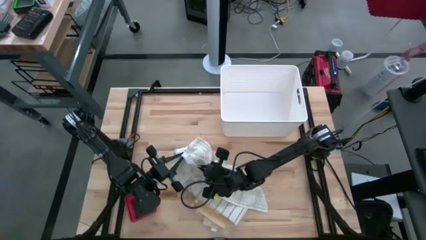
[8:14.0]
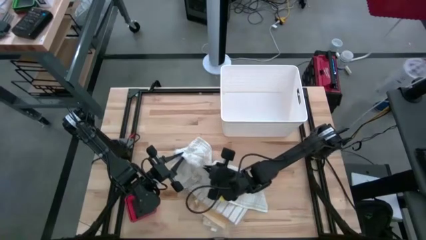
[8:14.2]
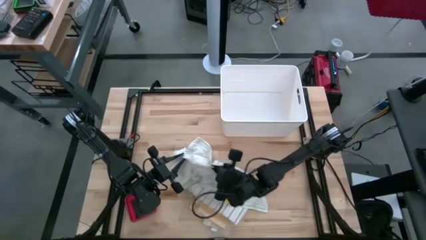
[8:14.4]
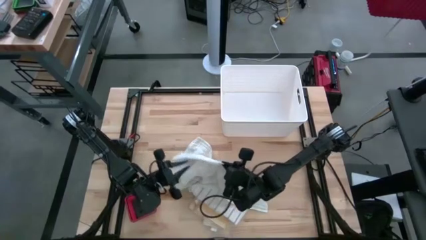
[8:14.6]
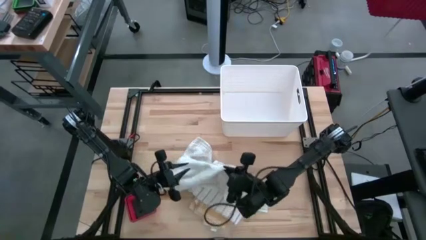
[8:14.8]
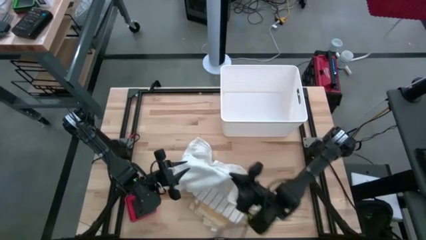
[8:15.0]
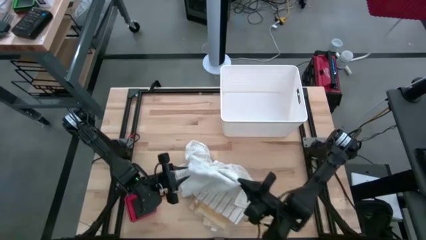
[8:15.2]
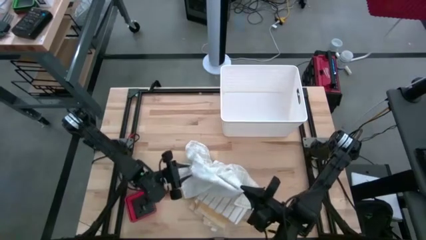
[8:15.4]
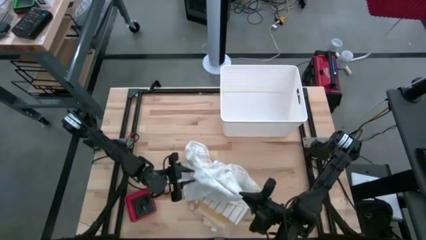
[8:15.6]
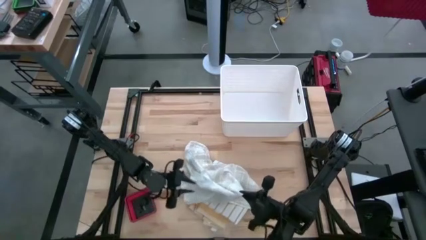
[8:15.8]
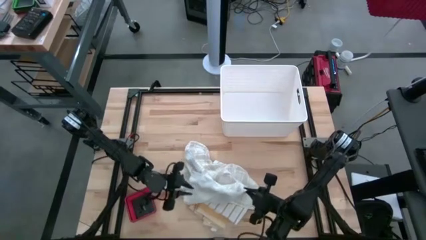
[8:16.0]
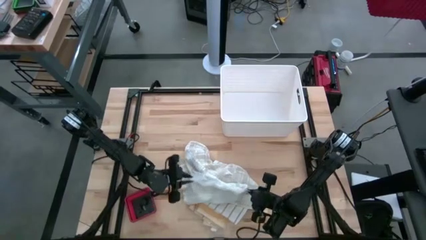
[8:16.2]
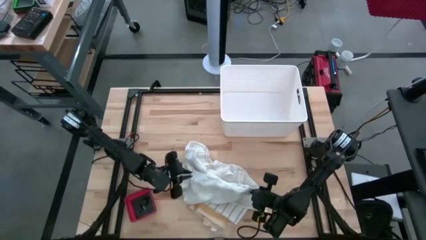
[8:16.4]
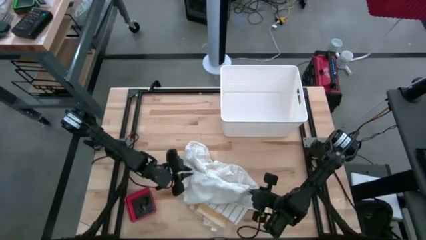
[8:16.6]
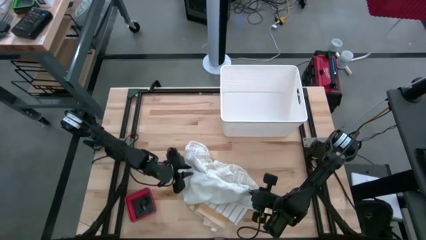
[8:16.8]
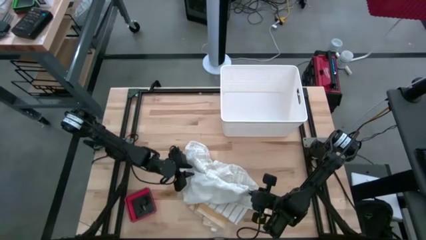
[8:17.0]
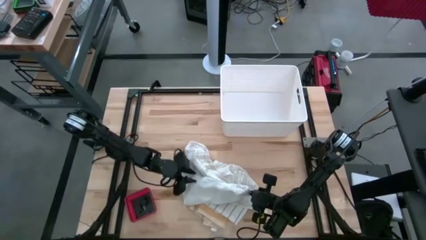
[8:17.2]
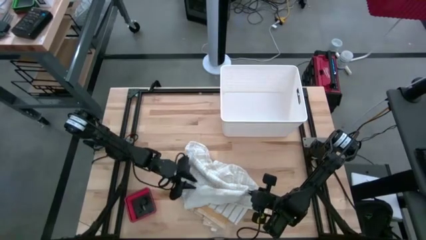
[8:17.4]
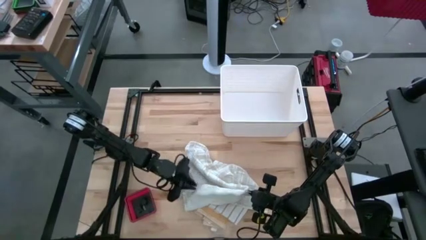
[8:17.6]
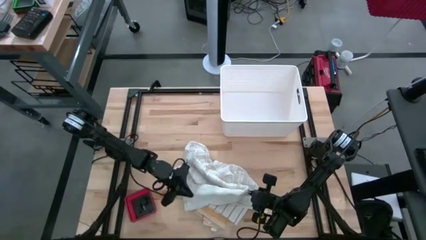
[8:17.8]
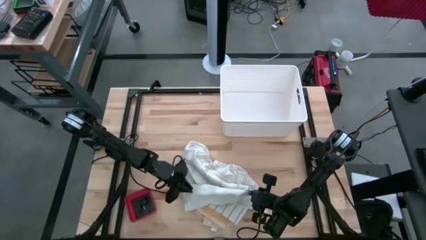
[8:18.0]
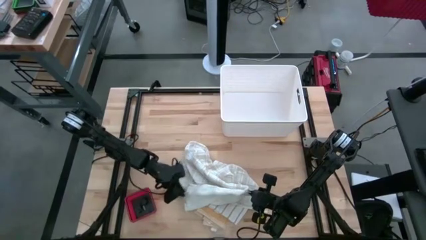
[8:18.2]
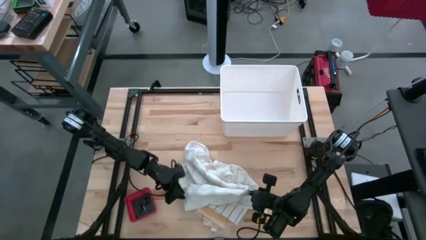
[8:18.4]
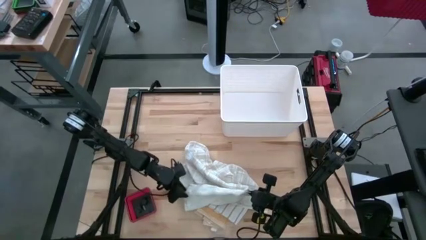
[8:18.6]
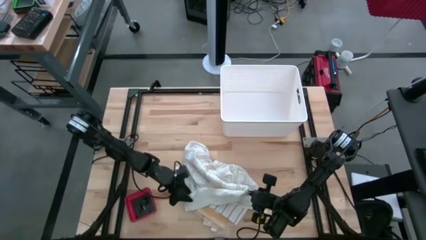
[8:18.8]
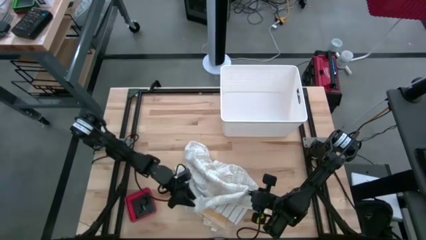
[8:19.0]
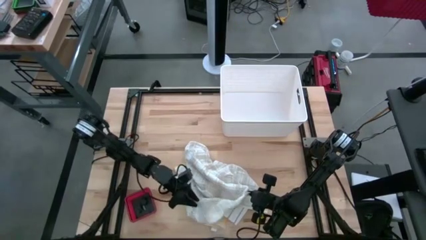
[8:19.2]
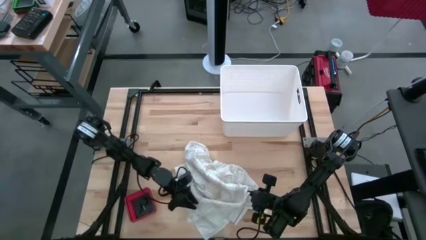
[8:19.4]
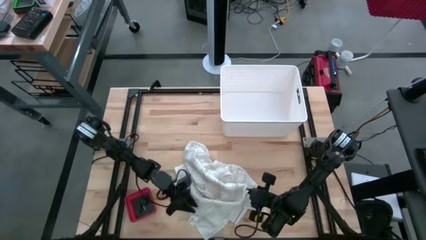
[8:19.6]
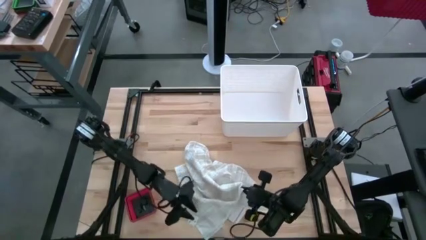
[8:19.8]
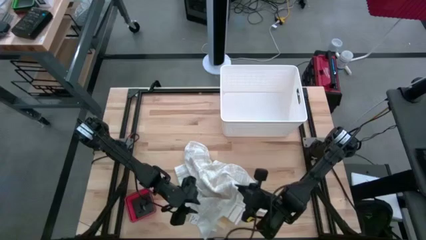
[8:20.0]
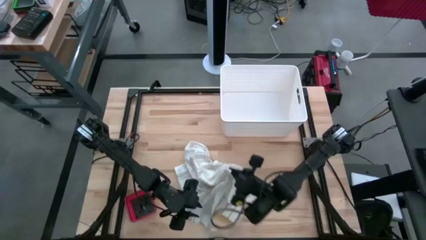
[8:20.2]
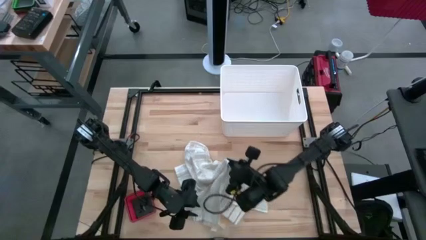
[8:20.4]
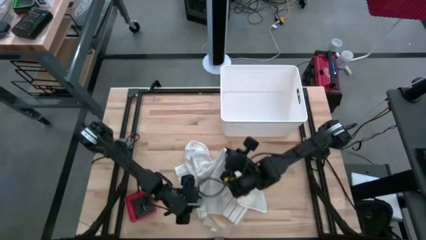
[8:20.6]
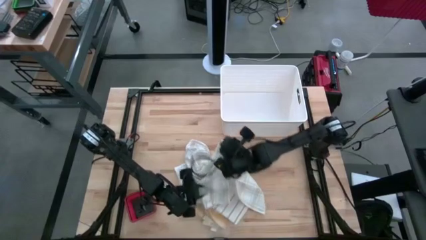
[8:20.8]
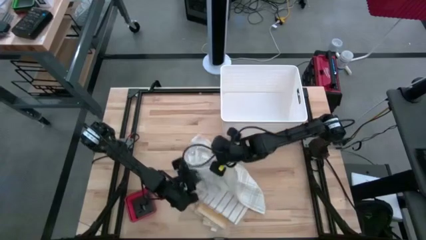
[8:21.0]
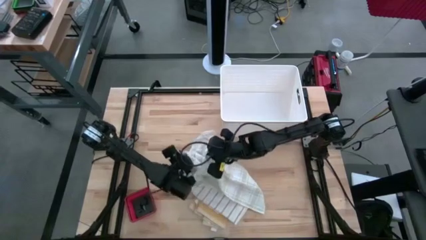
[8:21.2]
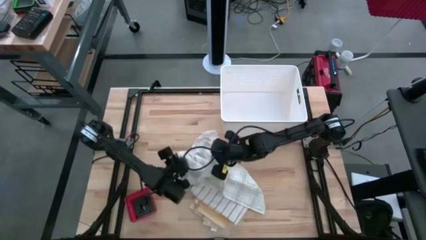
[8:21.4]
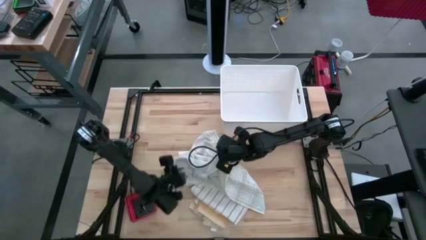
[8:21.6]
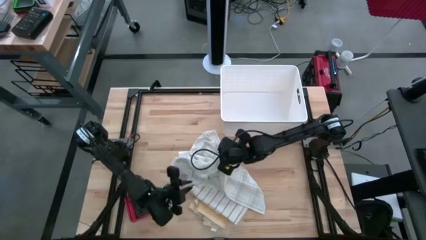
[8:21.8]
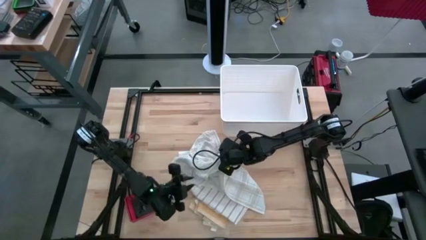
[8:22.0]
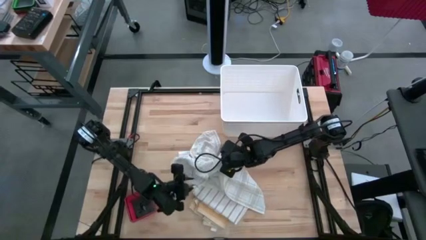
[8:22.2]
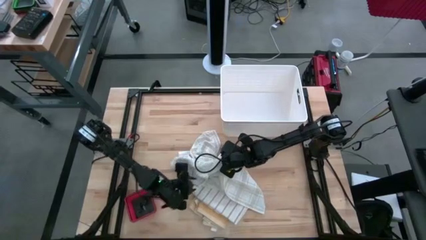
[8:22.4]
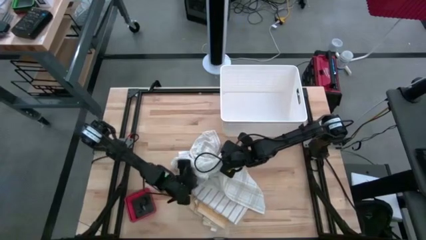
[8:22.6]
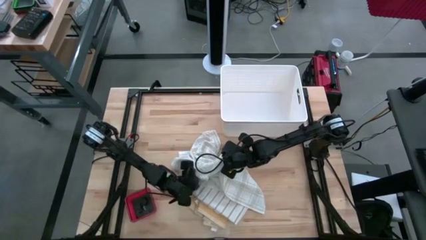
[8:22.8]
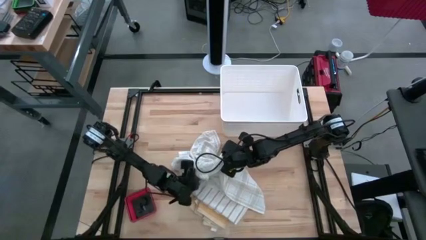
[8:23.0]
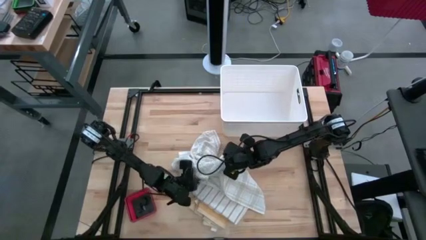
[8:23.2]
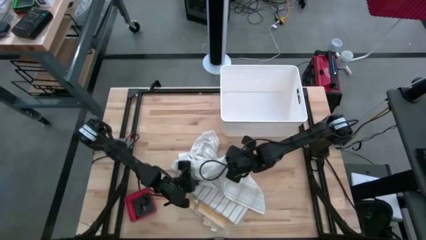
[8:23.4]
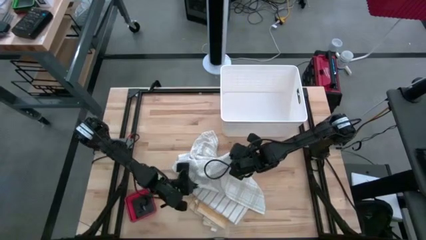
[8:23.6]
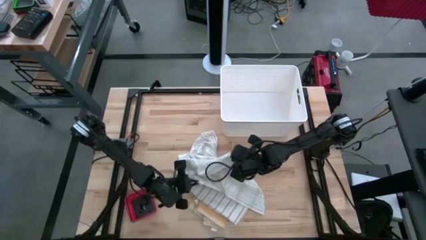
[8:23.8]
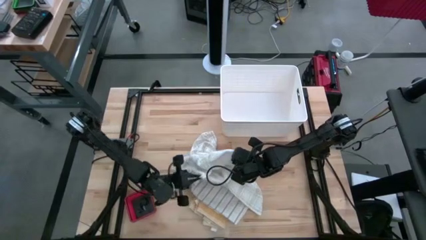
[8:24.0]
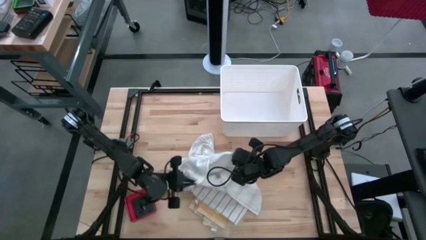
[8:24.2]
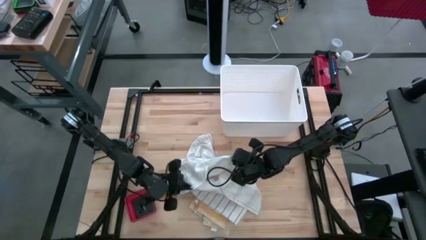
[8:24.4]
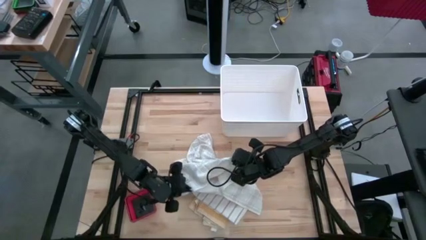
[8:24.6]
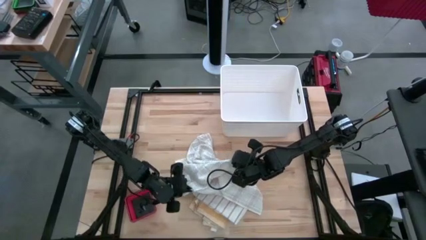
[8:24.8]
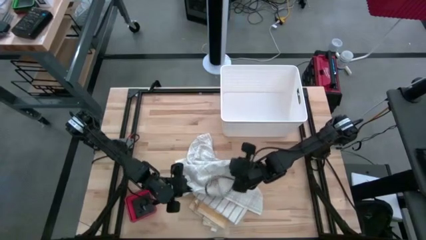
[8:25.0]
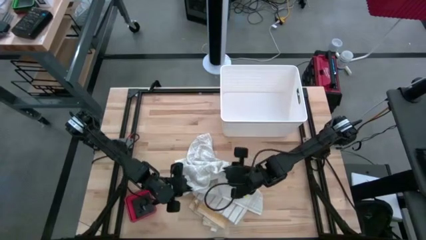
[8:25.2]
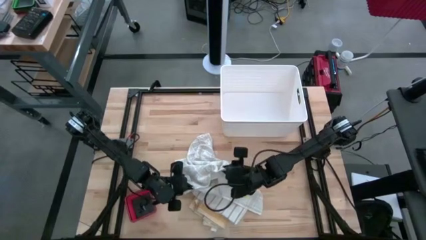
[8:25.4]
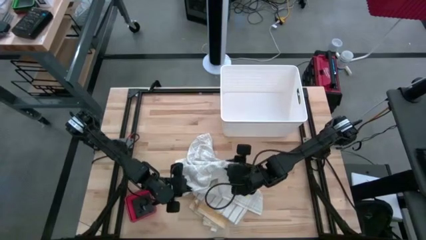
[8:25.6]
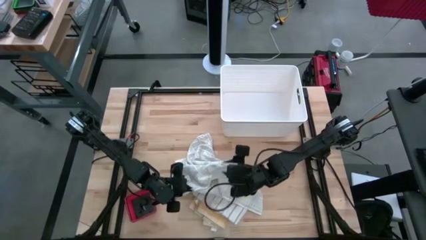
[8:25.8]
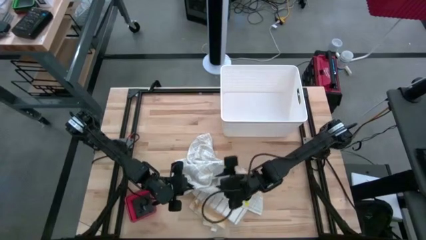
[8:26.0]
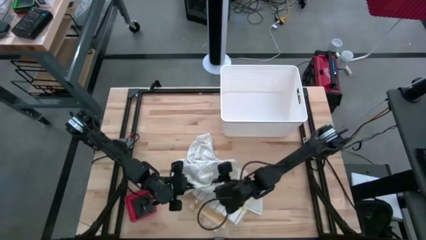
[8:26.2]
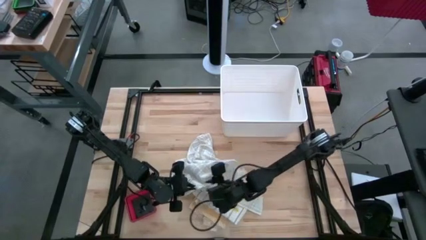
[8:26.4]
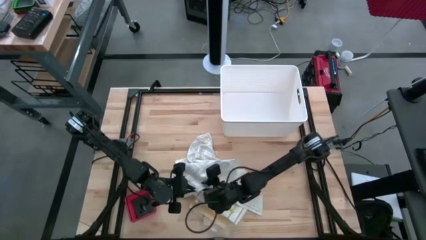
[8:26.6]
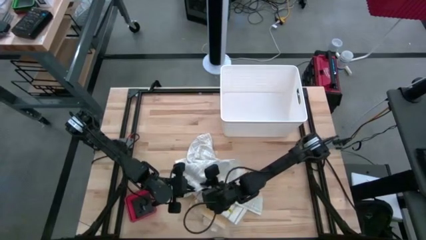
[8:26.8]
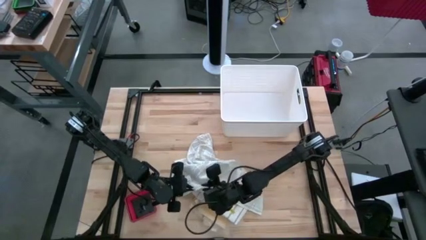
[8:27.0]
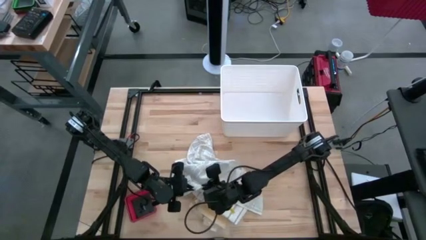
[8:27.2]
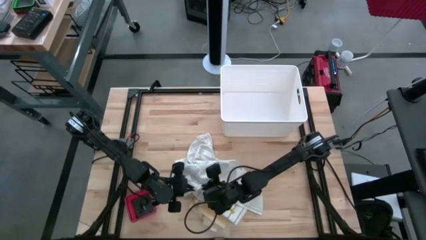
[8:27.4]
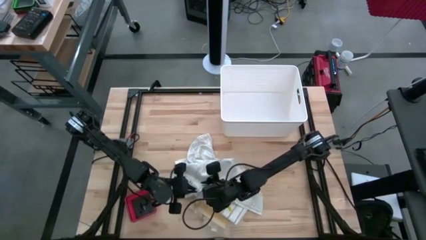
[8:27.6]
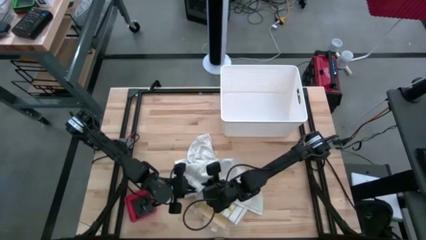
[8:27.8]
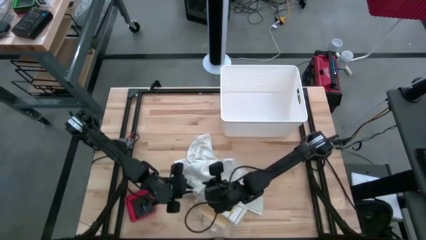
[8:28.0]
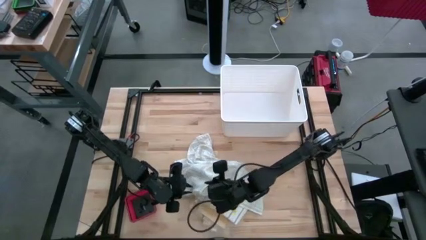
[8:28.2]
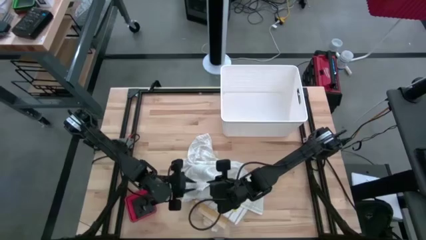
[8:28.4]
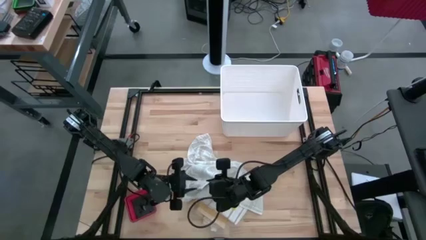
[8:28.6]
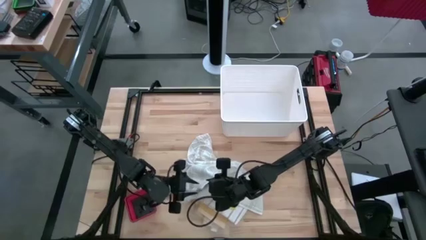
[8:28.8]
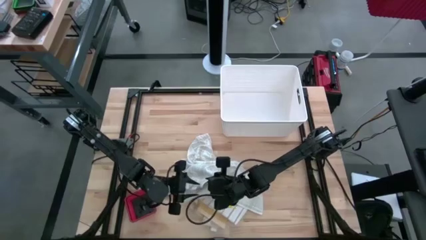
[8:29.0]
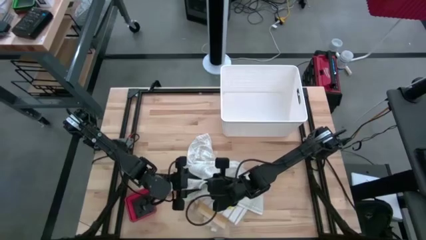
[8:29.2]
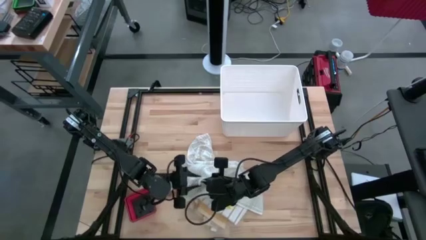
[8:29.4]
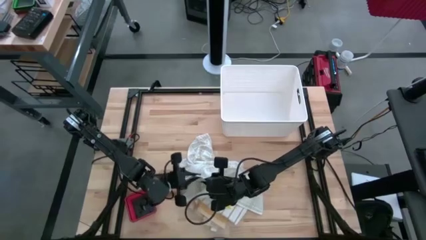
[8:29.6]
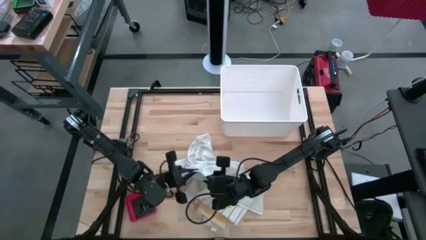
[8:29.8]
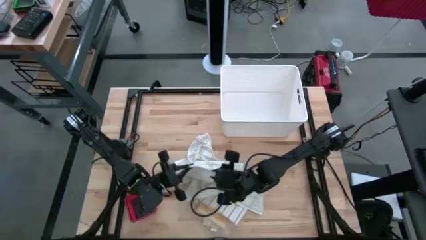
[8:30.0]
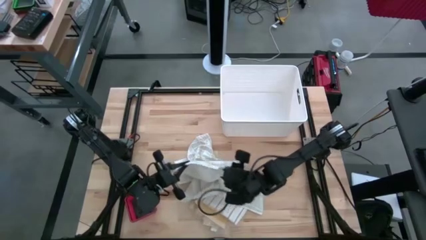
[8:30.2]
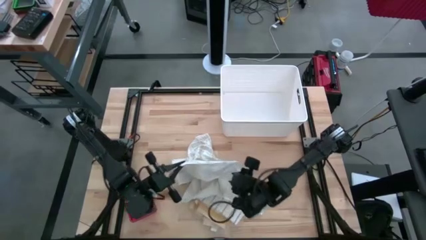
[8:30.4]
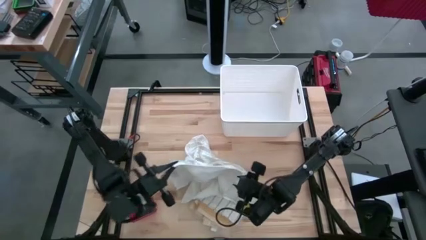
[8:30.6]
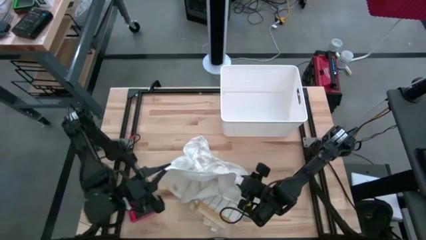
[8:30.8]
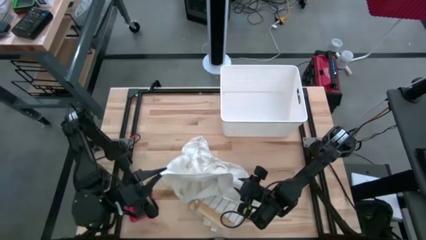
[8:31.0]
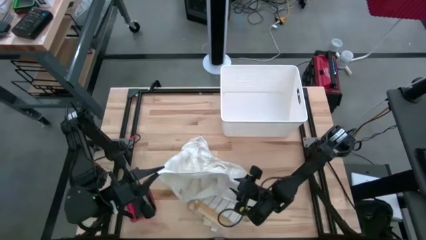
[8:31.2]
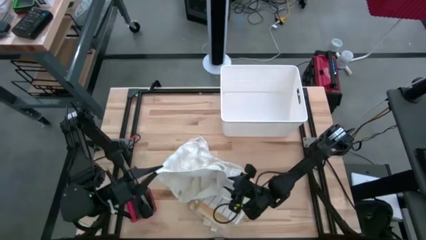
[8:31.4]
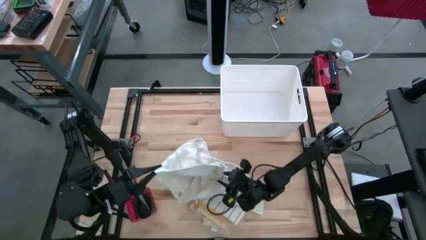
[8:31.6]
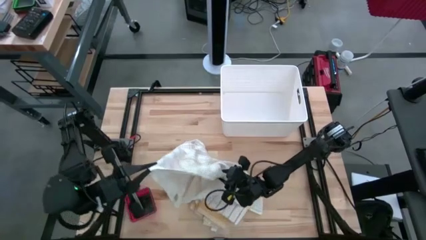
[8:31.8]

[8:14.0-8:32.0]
Task: Fold towel
Fold the light brown kitchen towel
